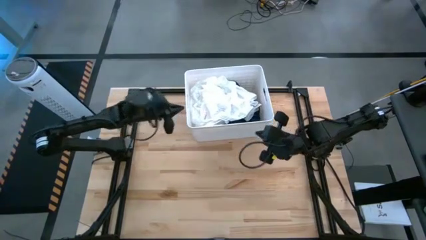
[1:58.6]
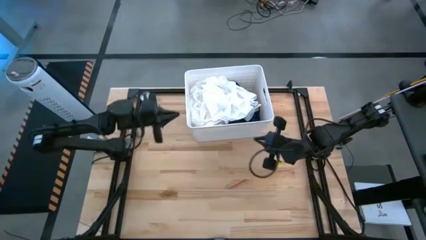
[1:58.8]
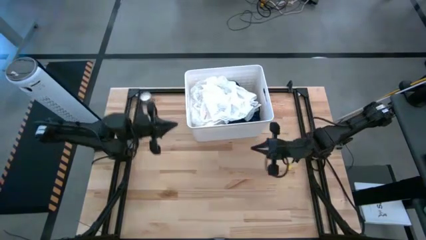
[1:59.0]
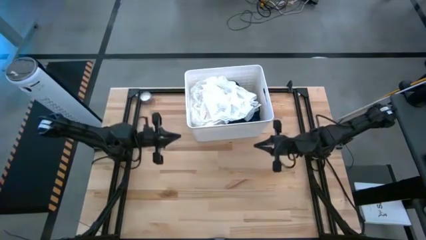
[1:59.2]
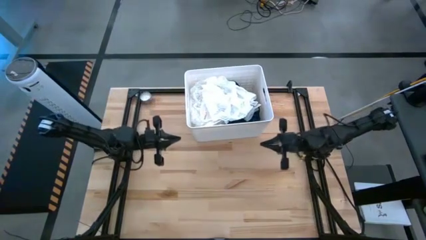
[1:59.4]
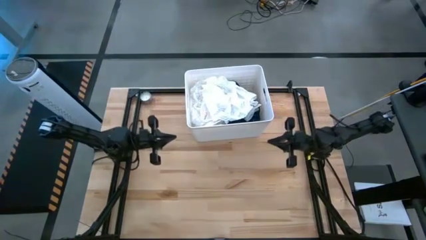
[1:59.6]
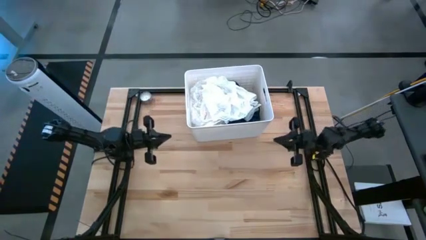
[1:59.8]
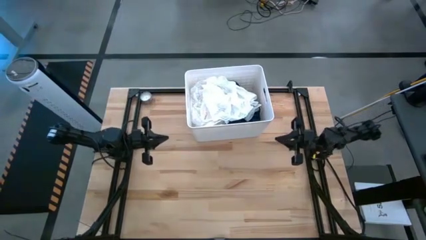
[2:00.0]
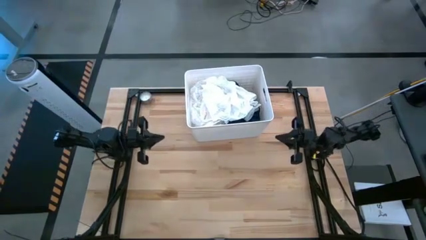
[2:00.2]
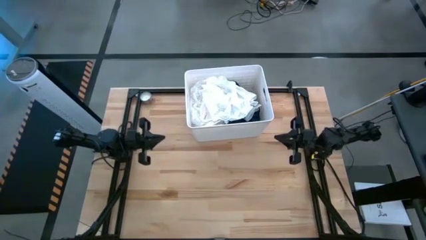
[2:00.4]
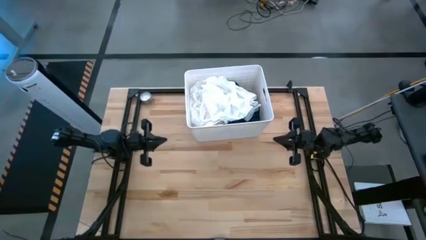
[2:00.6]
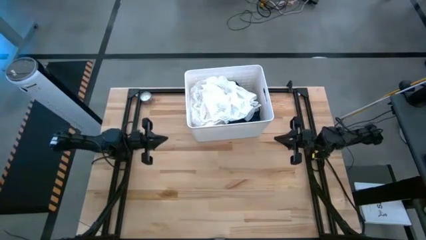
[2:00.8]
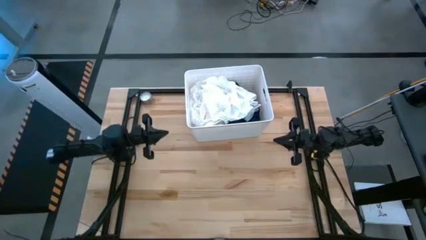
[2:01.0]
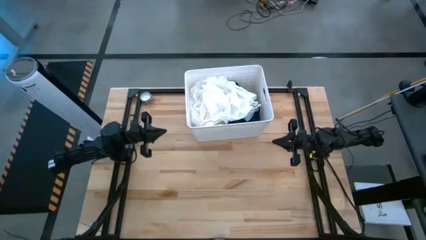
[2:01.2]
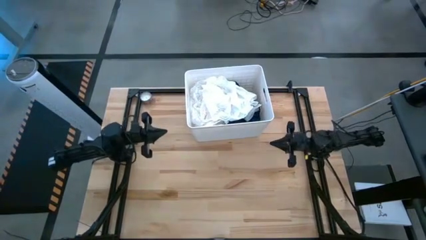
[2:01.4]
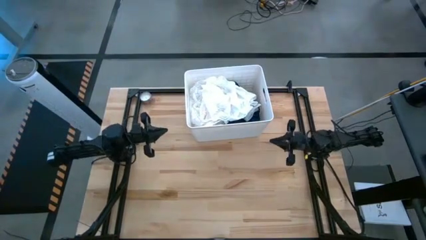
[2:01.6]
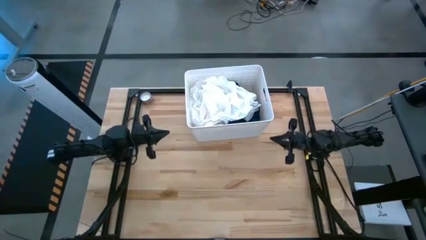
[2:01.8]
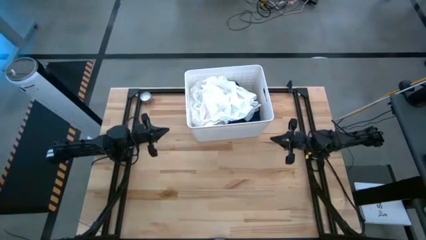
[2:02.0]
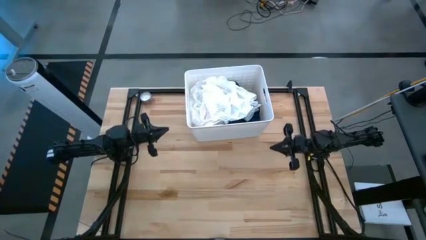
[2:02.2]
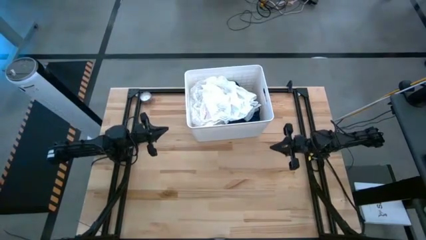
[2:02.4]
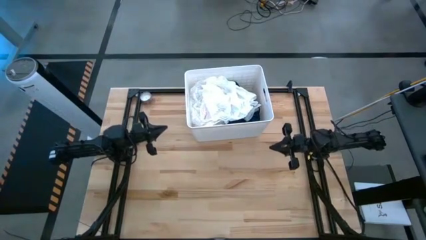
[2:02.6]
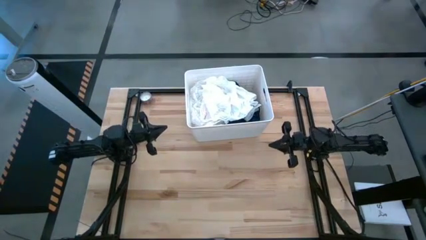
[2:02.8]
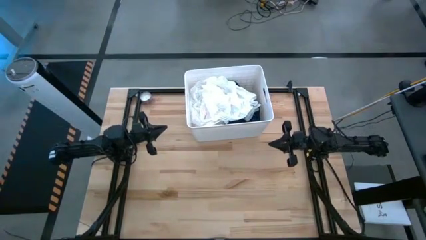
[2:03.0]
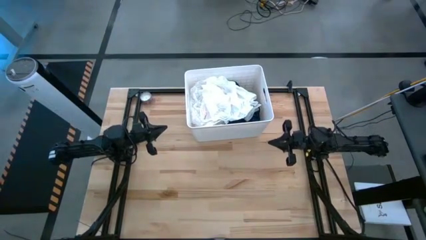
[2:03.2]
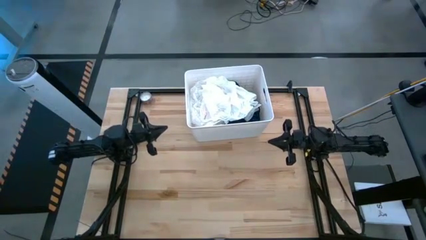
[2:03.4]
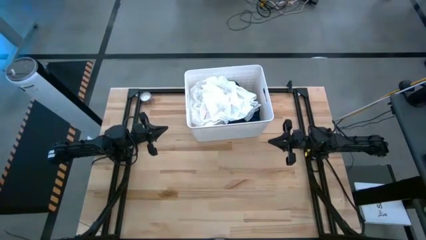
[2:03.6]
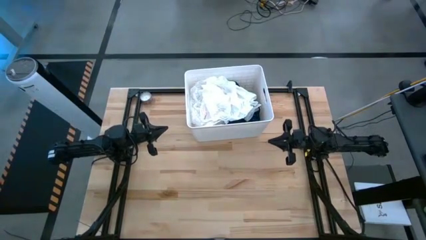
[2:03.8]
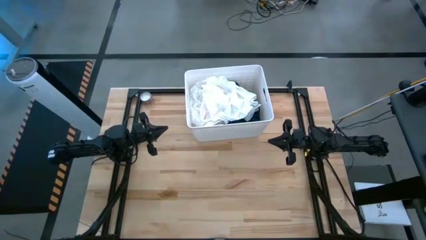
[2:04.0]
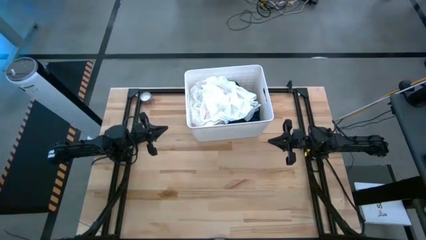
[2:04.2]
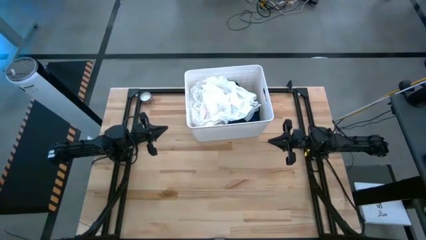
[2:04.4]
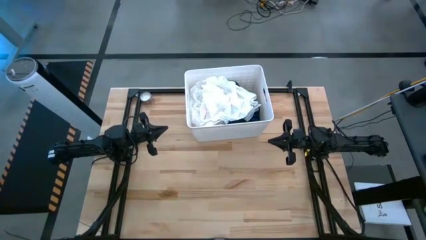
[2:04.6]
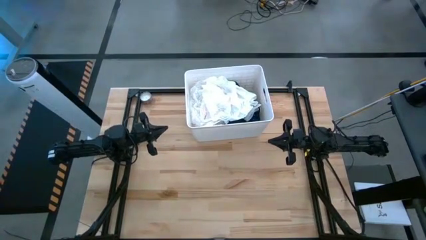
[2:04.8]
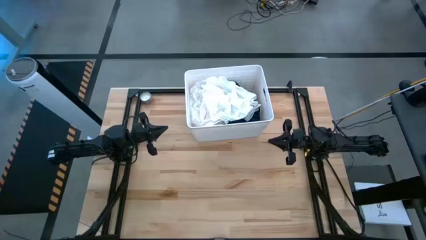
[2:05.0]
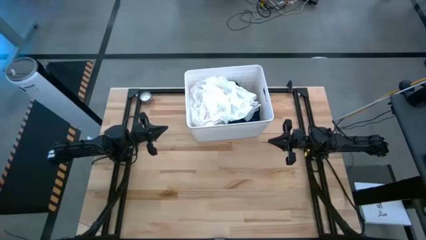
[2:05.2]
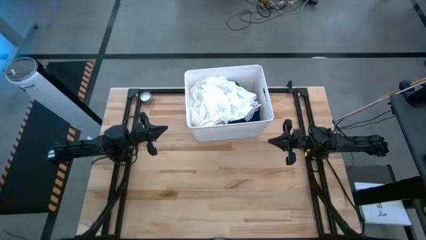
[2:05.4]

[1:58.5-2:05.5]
Task: Sort clothes
Return to Home Position

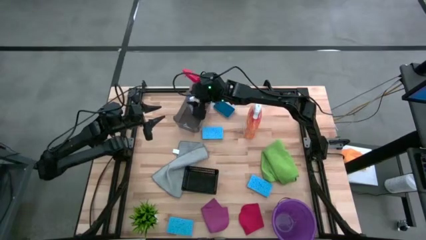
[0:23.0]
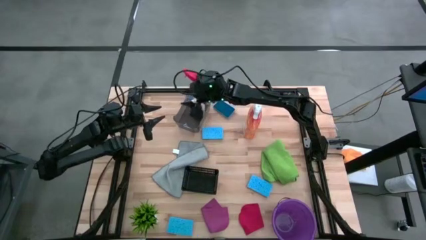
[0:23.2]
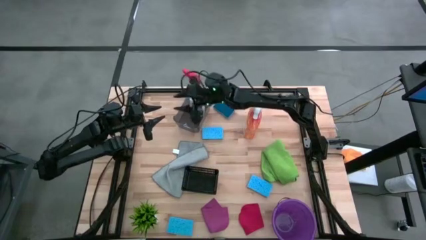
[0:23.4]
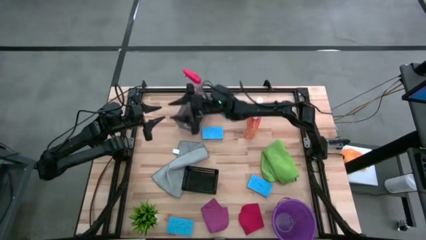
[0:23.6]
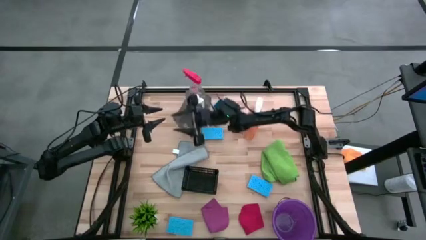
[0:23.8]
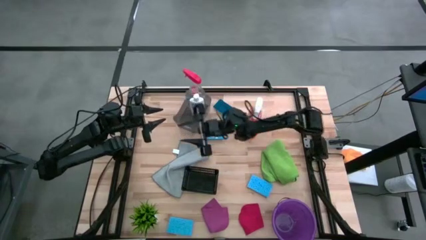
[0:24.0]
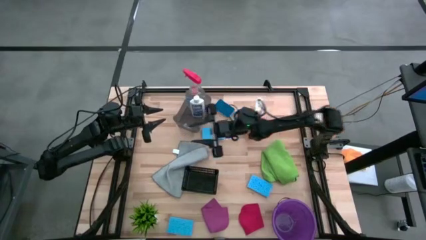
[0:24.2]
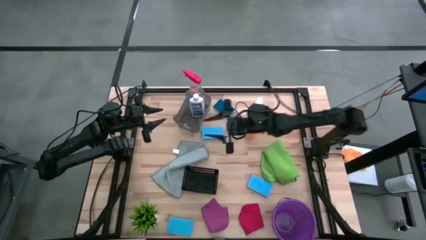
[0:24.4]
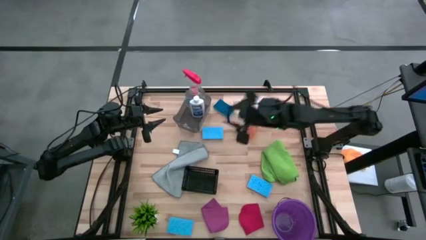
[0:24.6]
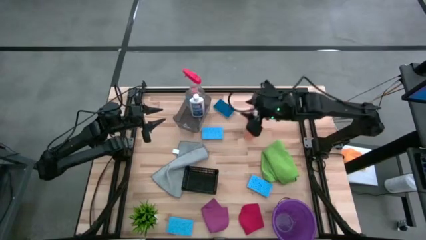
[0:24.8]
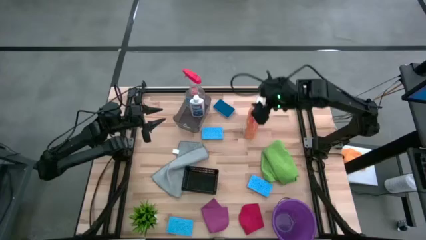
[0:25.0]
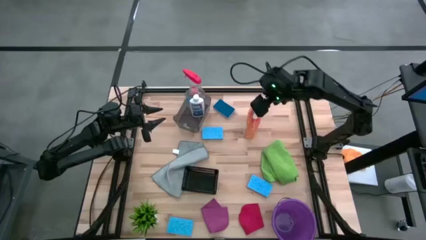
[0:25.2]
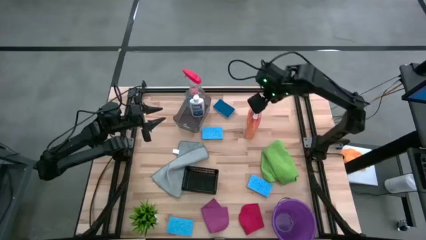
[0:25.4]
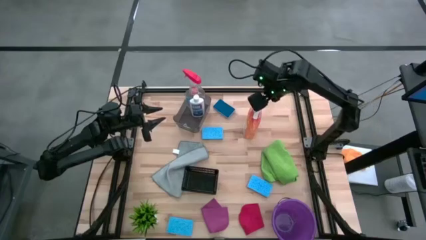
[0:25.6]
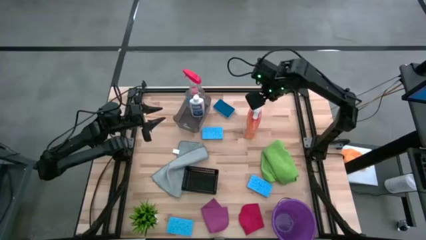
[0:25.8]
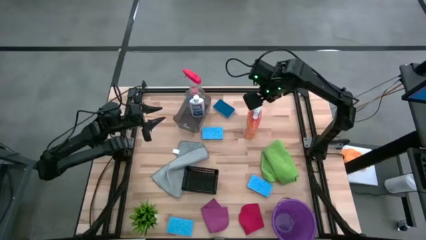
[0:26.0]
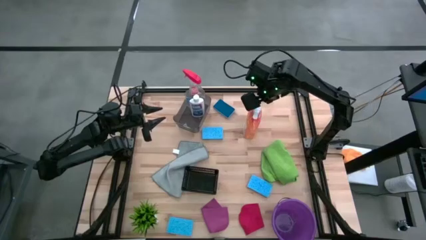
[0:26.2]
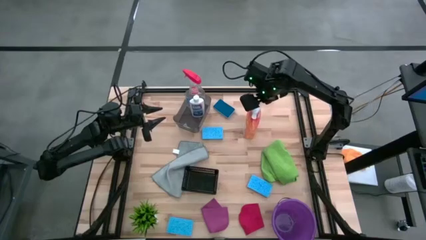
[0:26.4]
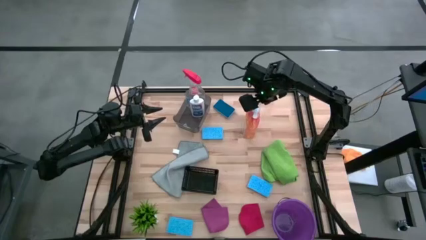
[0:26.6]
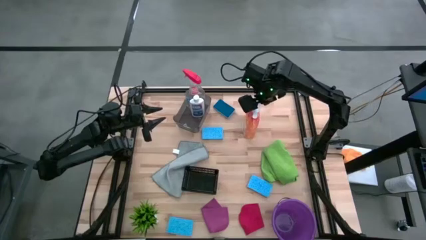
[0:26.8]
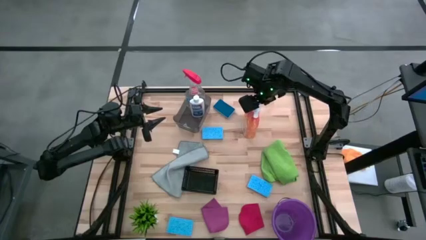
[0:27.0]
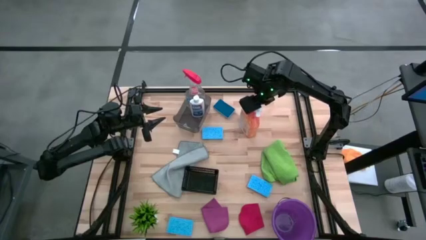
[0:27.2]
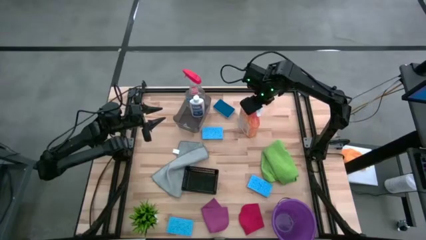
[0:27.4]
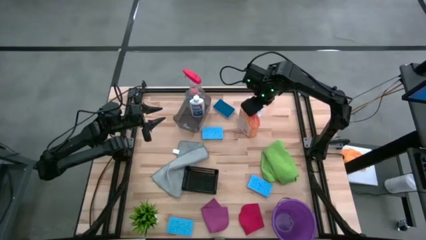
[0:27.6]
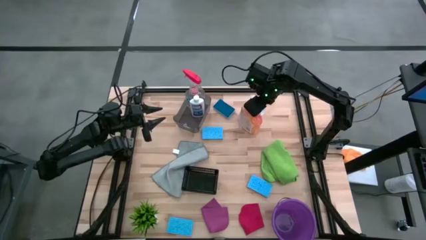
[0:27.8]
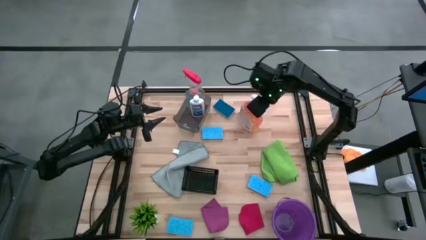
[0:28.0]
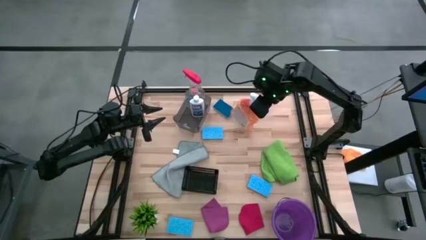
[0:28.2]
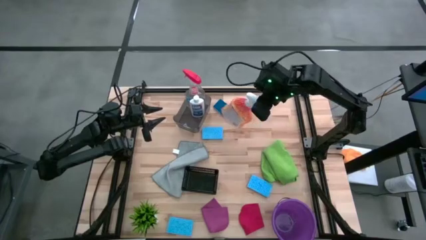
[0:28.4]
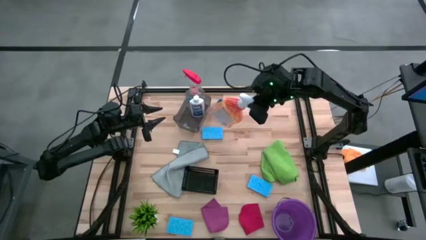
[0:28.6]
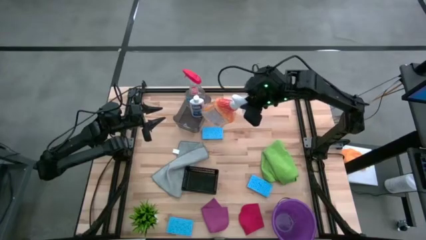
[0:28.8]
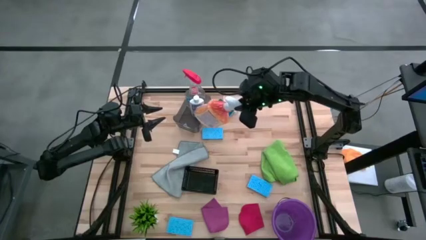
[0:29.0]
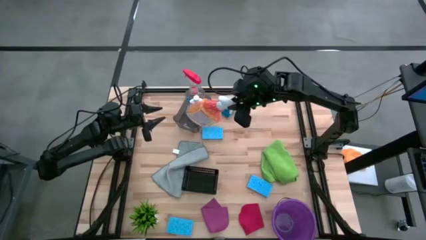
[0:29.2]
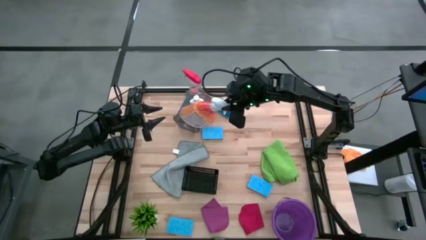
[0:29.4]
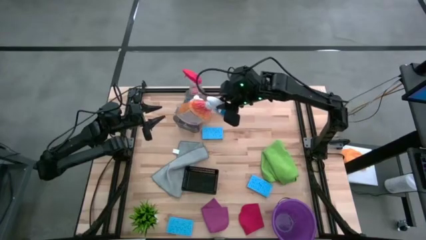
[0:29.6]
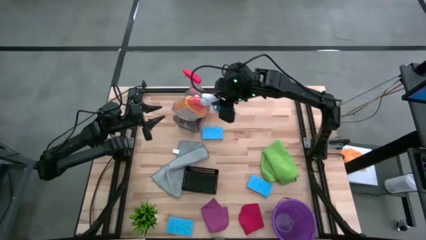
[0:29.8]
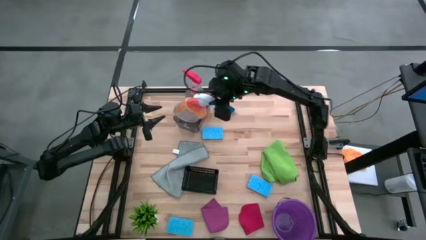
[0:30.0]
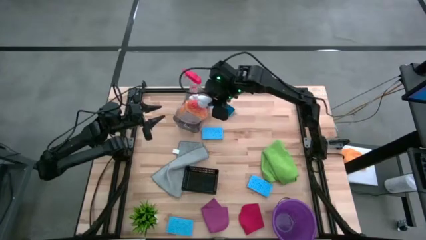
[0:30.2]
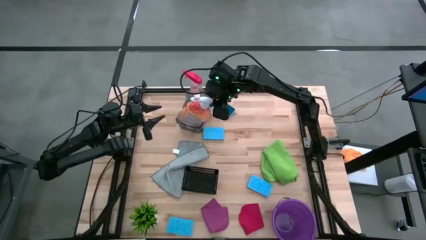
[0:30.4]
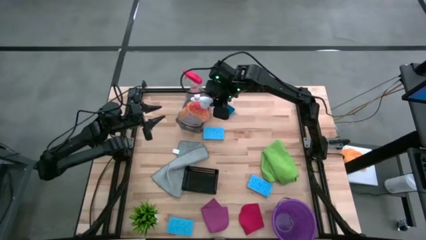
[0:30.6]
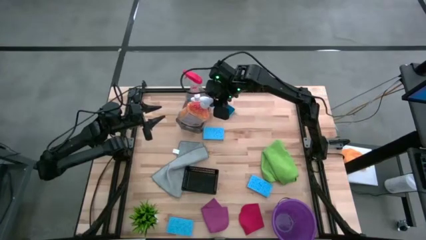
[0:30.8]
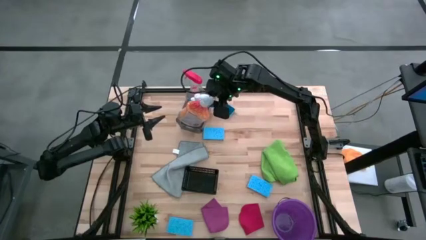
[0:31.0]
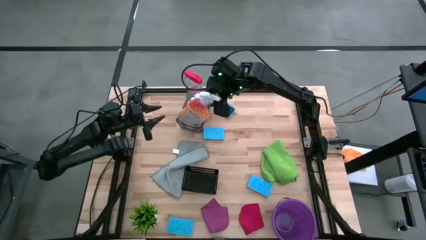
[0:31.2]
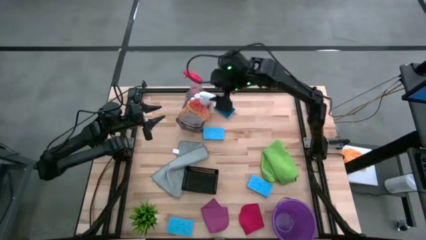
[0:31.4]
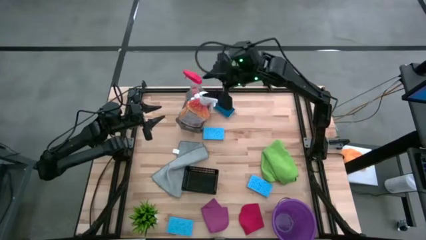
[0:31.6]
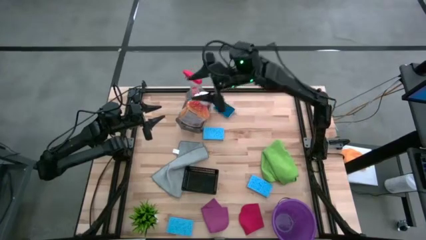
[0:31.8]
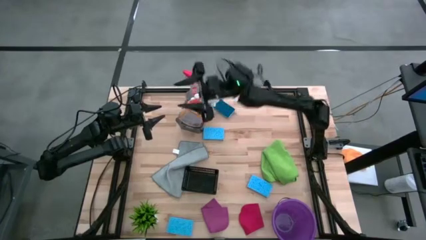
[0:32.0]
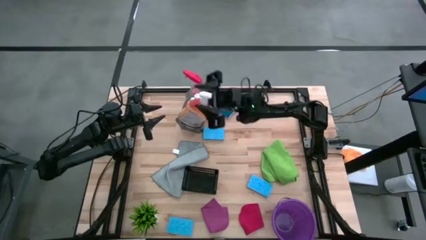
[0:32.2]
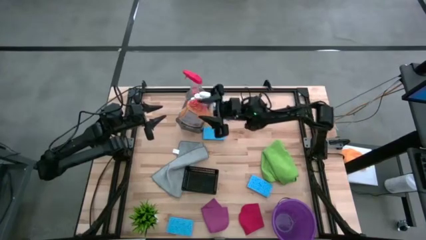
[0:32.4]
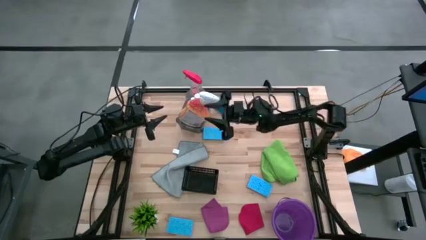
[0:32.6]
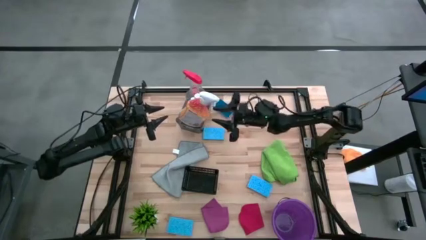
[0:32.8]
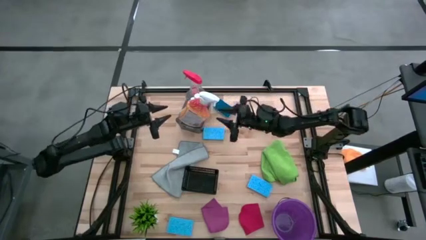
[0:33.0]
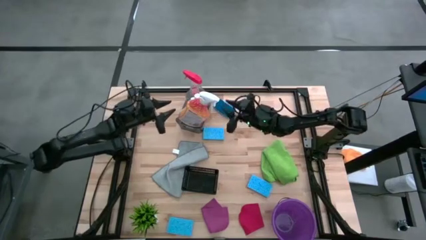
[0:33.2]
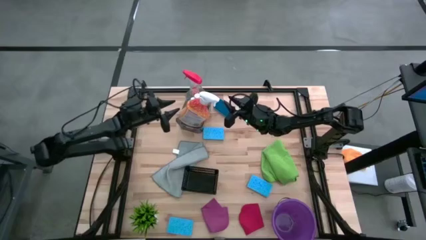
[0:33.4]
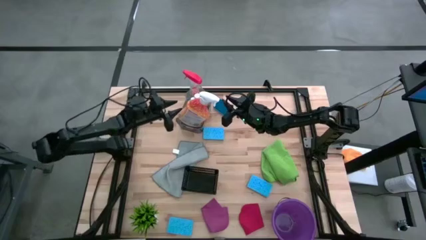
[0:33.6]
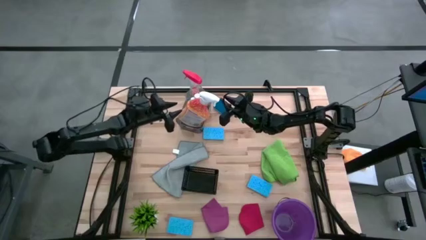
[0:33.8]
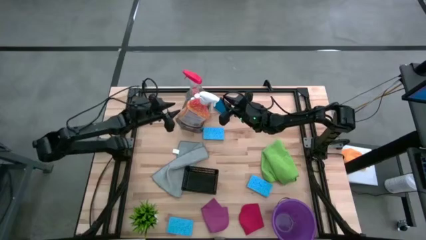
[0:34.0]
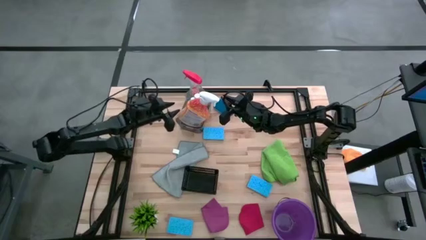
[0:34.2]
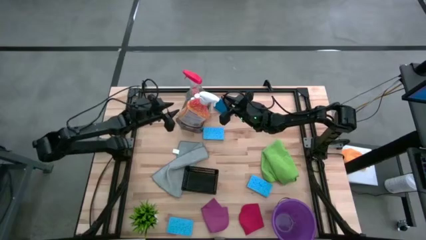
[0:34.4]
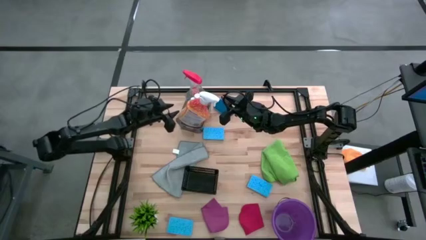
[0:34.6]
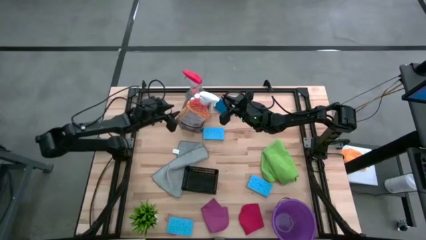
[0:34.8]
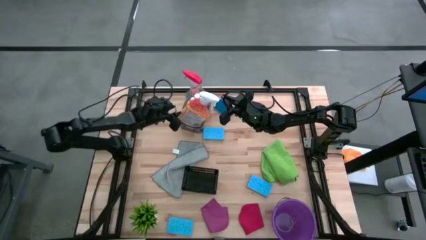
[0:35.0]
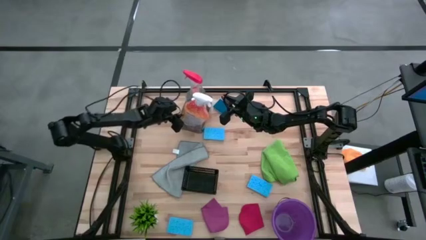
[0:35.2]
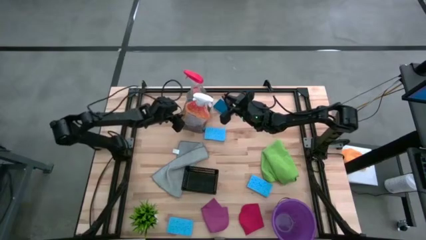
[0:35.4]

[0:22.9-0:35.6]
Task: Pick & Place Kitchen Items
Put the orange spray bottle into the gray bin
